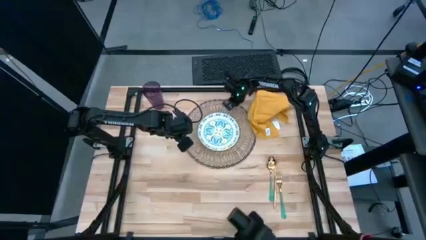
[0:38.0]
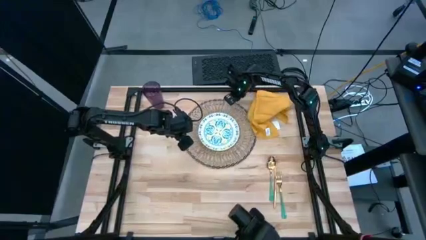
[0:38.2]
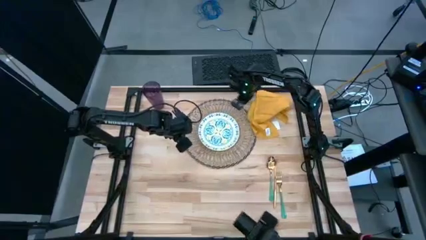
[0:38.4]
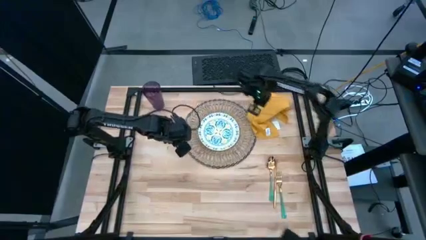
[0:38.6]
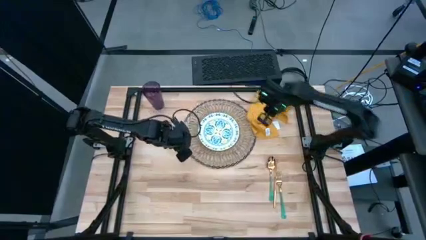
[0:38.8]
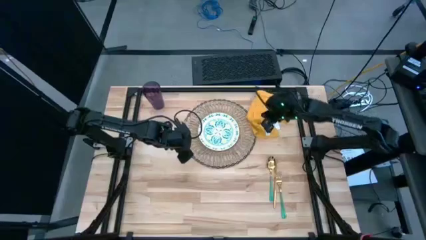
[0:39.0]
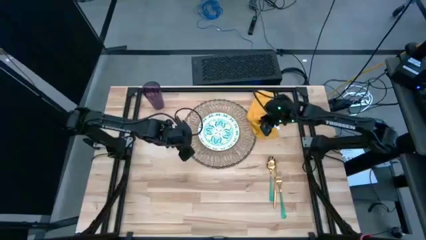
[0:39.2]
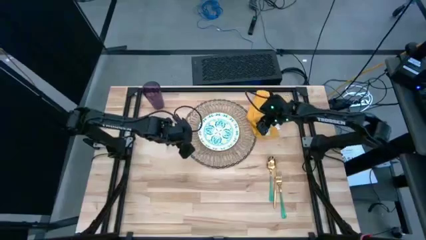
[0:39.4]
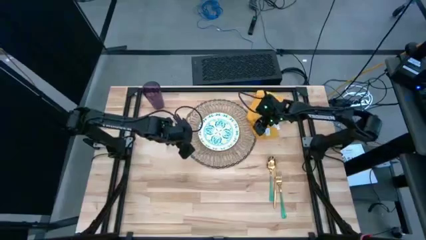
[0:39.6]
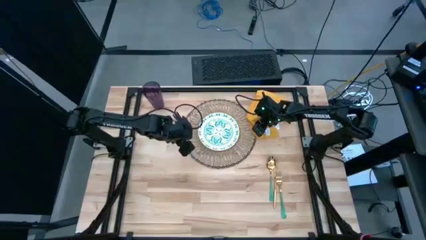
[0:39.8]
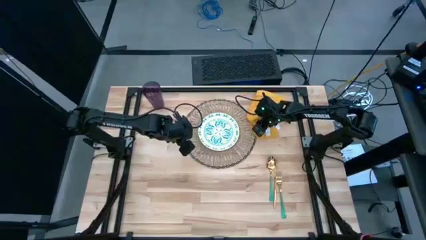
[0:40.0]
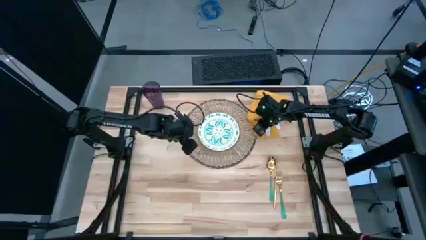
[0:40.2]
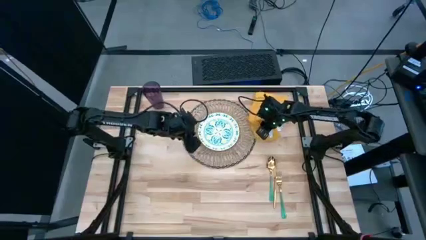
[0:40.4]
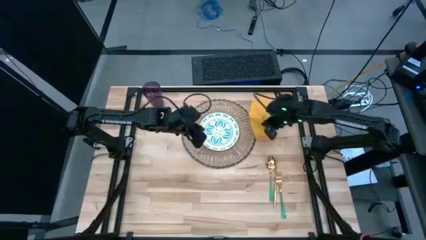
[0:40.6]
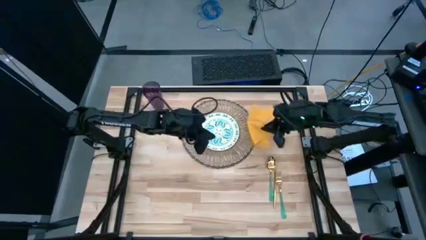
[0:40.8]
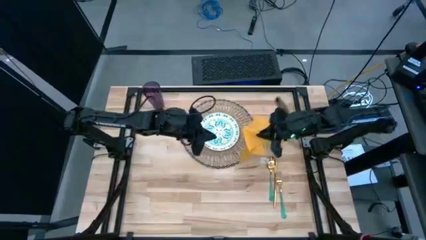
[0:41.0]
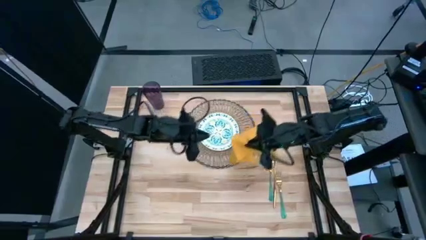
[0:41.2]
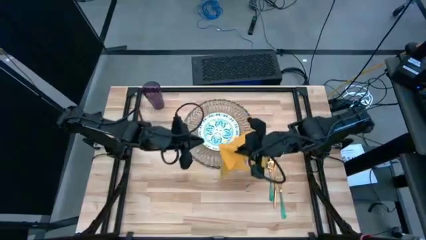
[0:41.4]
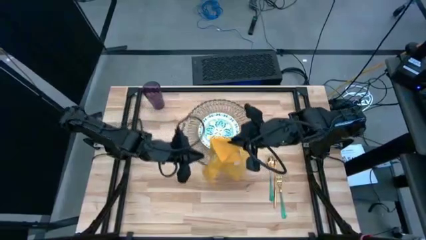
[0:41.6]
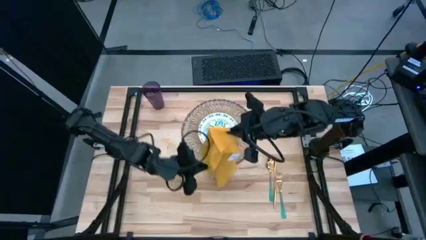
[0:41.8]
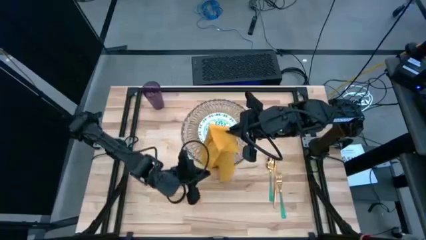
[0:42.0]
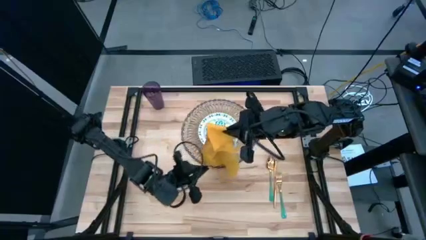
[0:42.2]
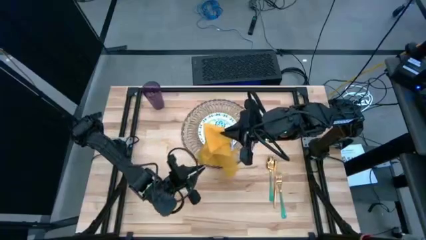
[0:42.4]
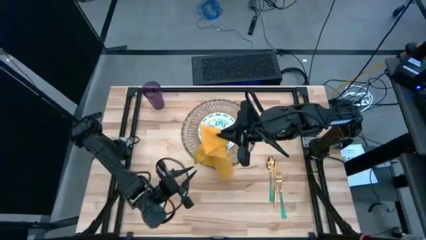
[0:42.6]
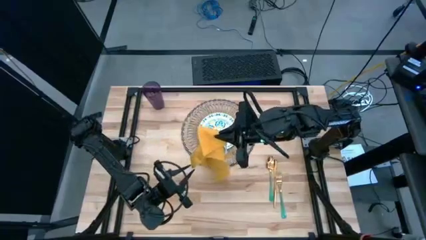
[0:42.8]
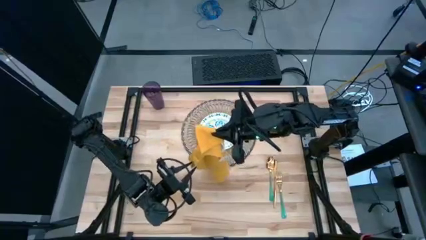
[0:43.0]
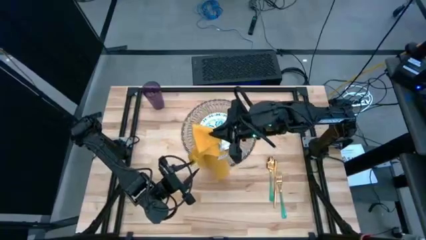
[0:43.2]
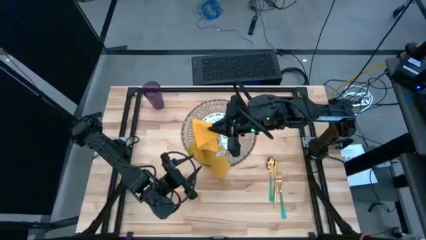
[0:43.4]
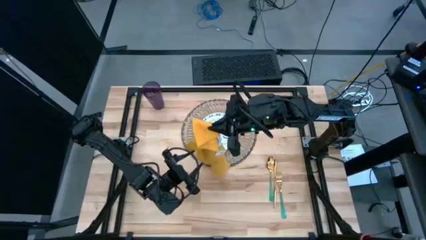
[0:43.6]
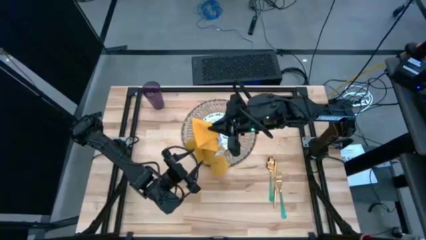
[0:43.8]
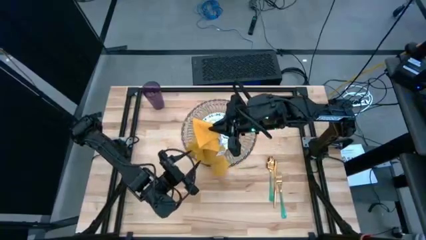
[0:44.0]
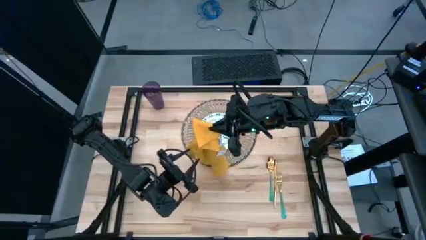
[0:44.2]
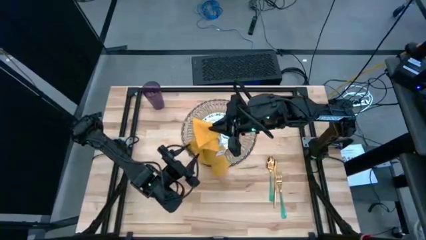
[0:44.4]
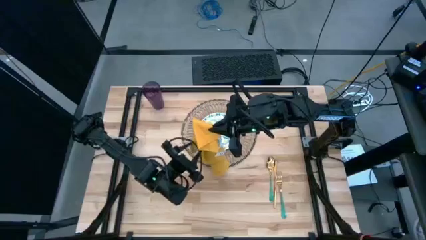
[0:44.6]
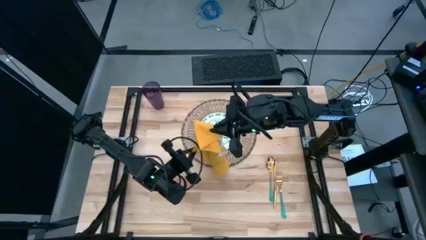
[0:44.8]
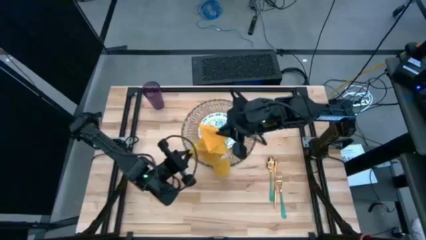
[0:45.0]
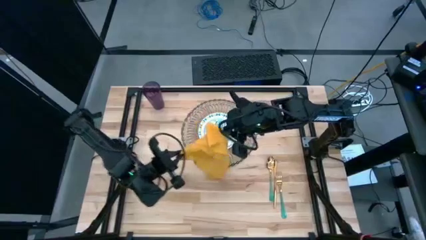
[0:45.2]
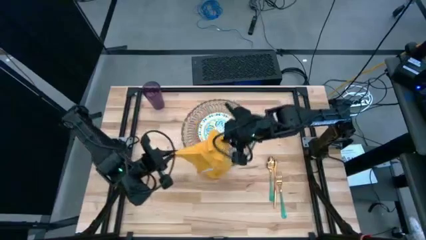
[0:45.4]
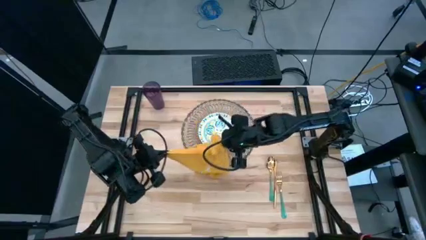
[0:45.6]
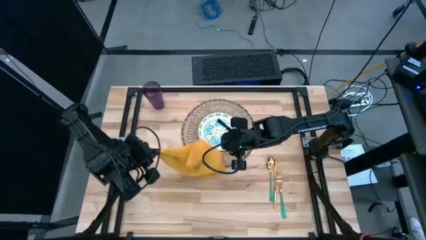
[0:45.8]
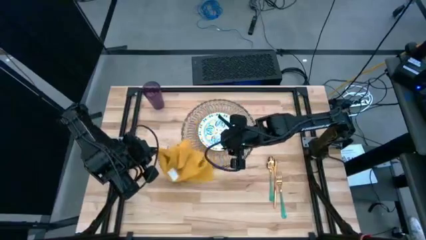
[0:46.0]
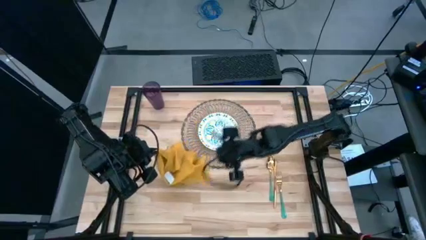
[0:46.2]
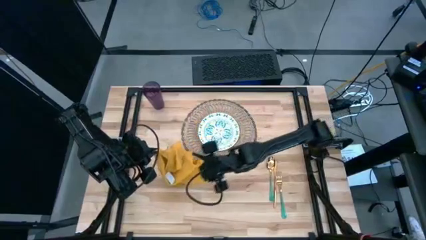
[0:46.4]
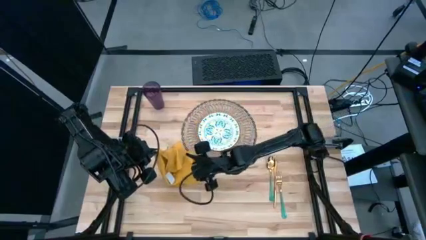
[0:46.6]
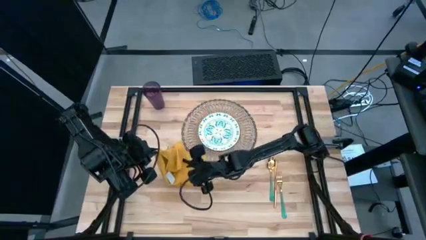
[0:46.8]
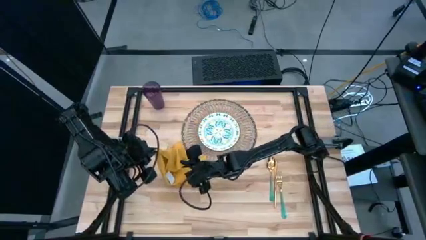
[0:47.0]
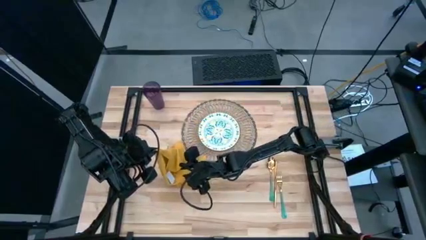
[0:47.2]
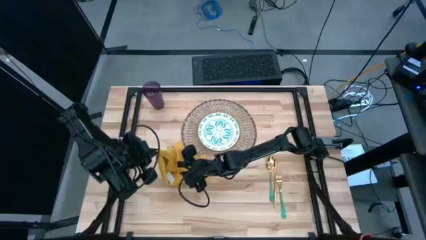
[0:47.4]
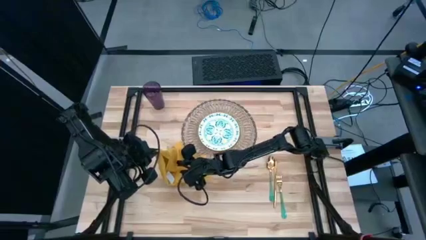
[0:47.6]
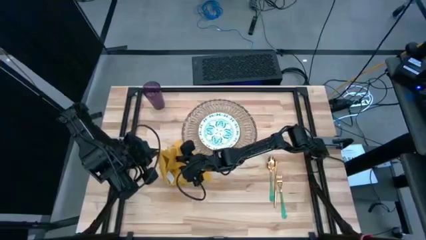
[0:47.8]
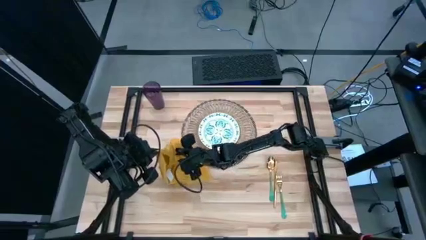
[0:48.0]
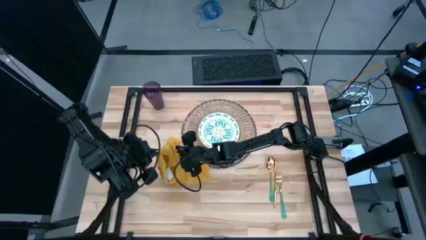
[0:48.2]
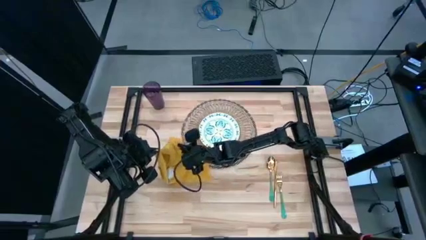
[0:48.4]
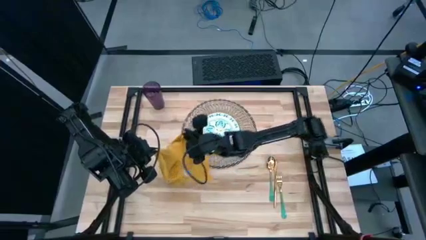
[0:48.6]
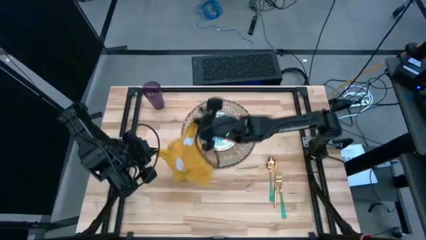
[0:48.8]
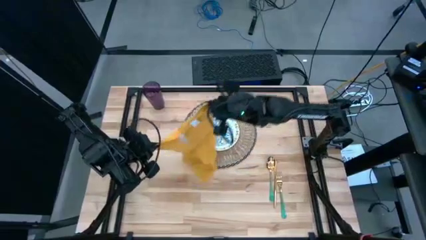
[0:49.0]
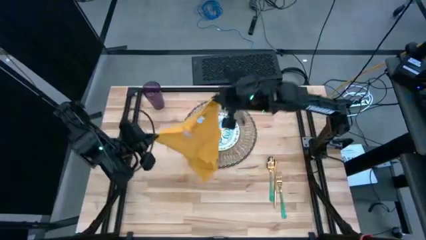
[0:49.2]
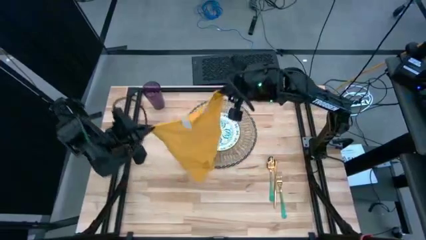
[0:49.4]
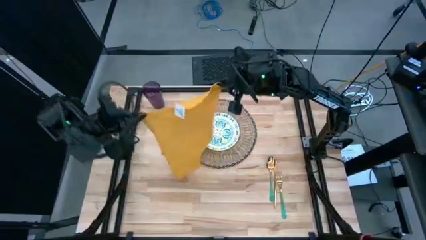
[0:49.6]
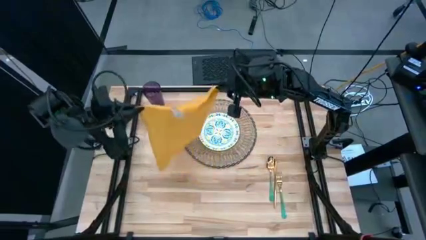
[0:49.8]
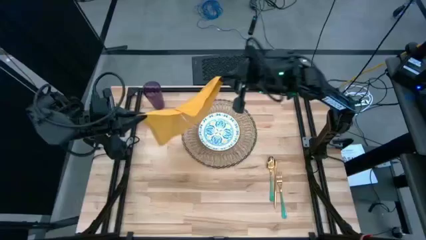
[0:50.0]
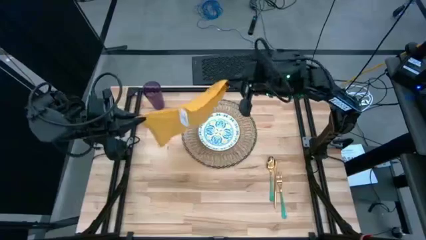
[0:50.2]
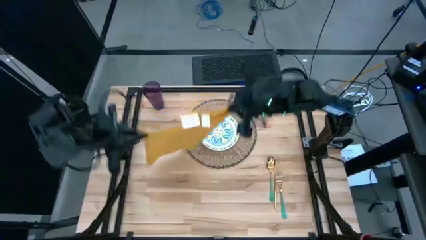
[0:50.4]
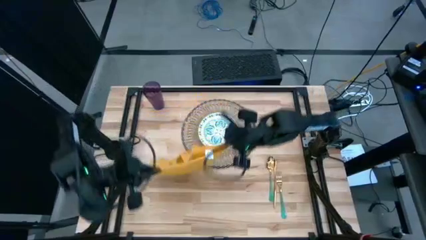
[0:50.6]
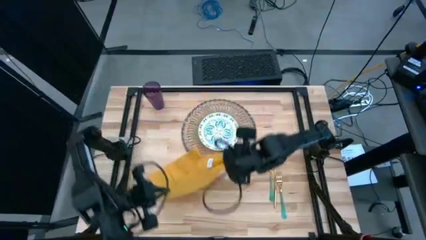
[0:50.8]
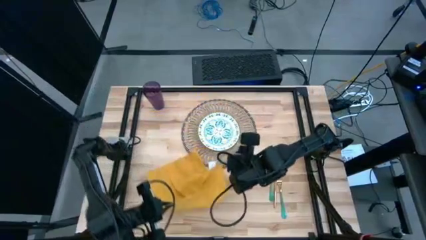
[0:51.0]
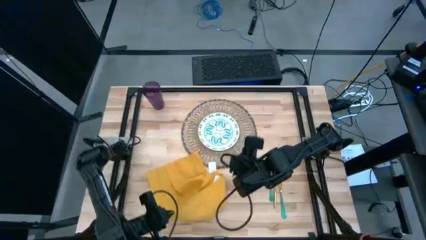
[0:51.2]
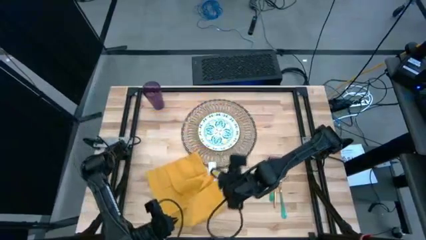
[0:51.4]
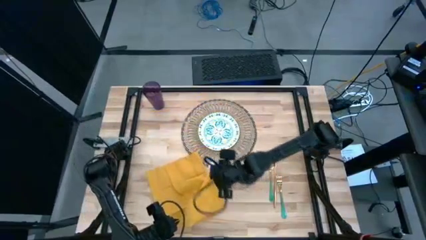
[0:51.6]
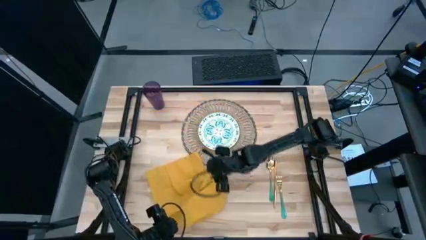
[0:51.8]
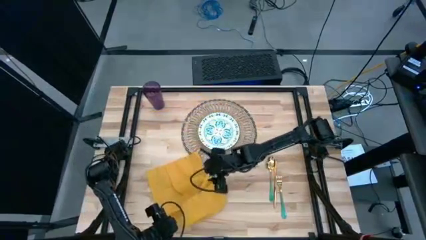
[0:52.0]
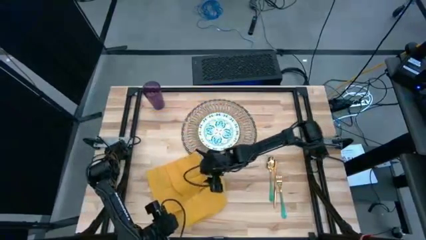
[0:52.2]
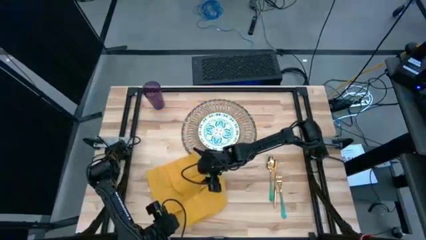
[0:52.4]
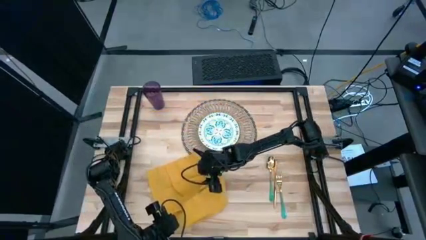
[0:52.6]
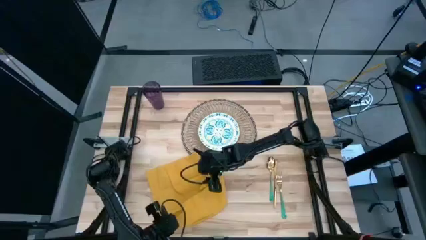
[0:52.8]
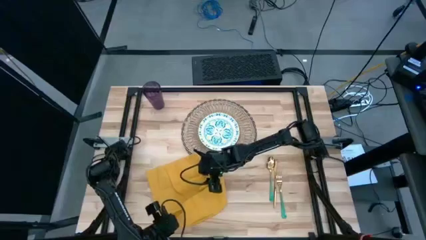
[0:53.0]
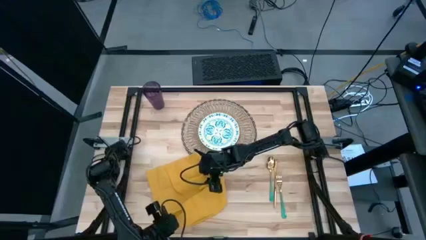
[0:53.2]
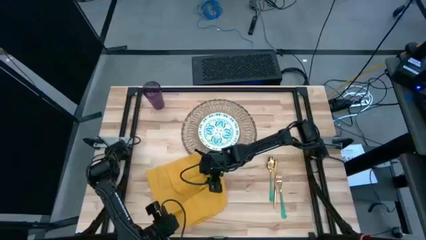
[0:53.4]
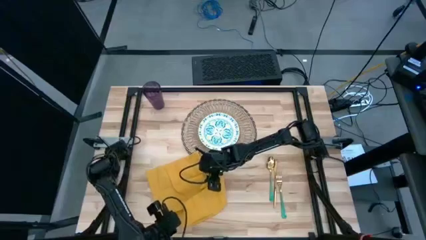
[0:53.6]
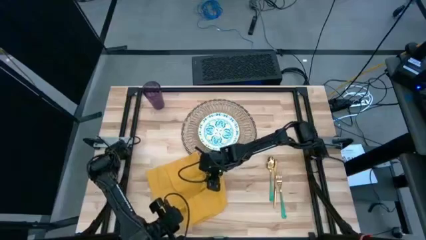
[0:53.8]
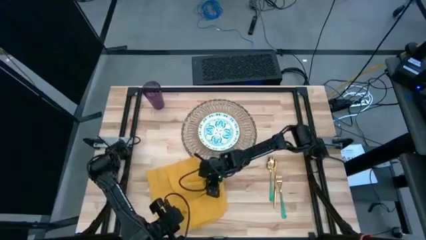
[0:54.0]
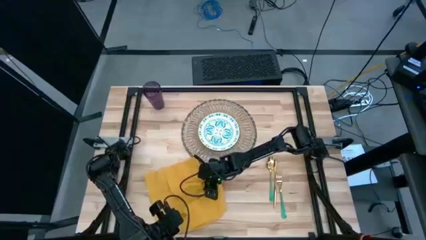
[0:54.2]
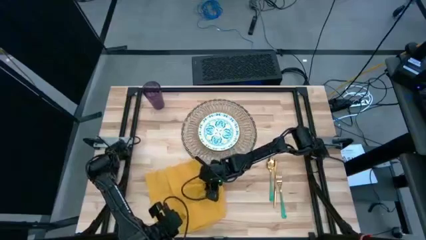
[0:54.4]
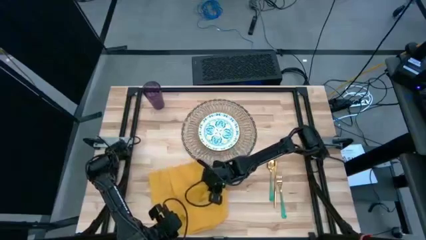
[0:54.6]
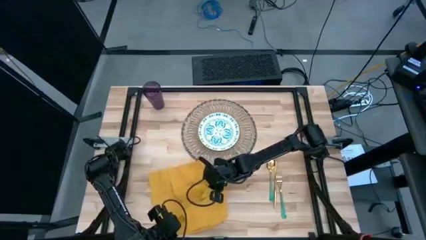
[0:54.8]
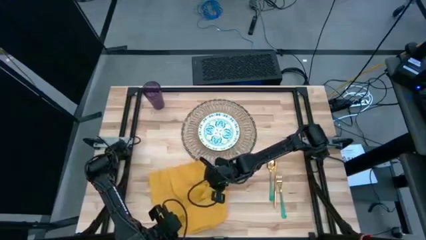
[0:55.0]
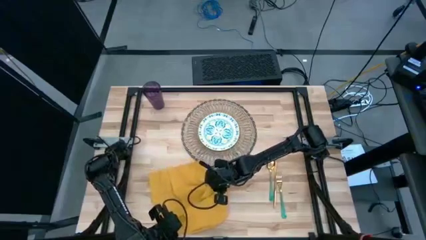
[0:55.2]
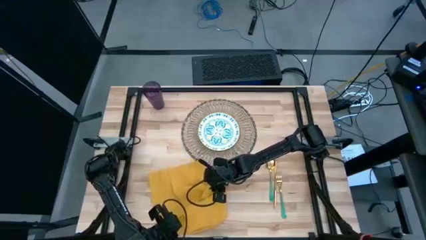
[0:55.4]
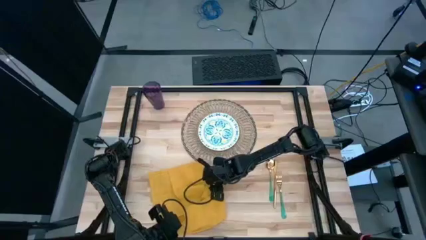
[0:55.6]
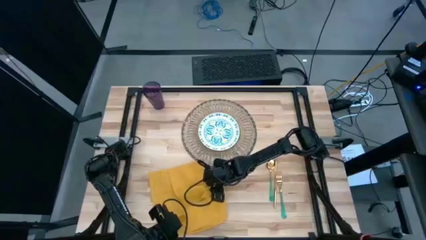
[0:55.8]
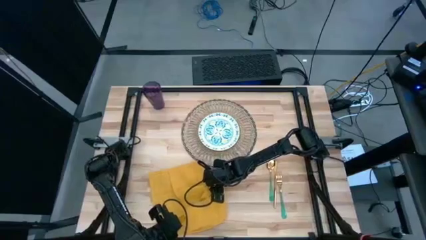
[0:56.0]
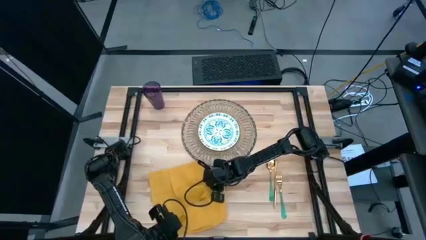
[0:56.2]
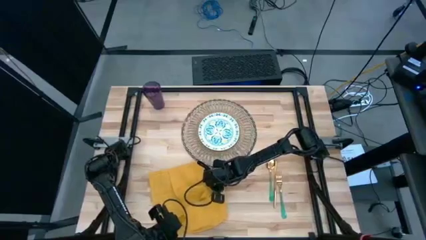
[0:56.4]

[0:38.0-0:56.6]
Task: Set table place
Fold the yellow table napkin
